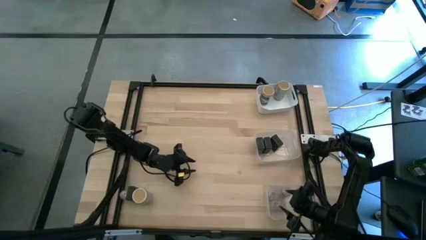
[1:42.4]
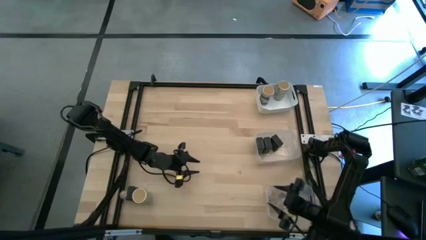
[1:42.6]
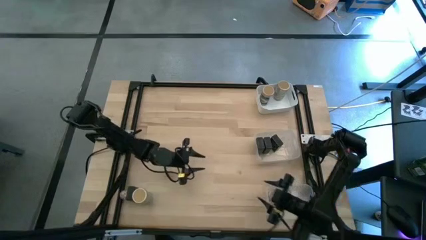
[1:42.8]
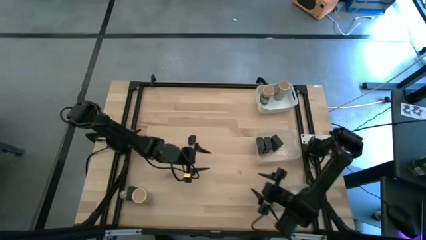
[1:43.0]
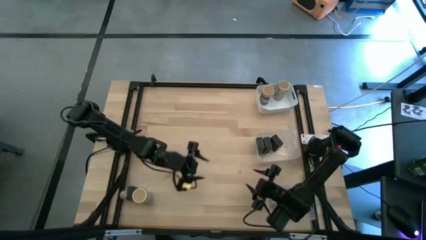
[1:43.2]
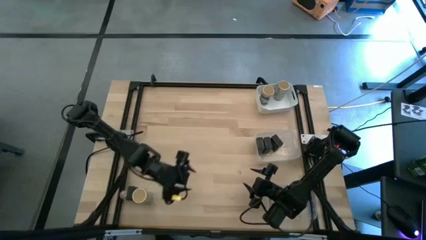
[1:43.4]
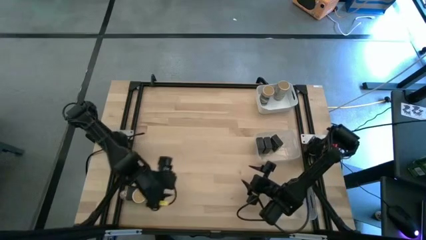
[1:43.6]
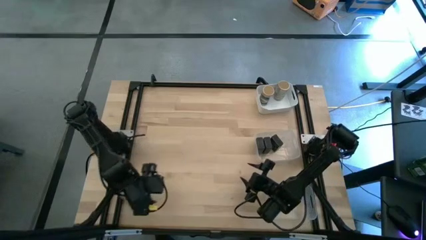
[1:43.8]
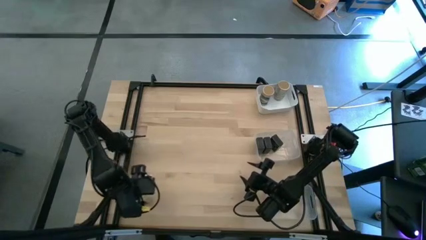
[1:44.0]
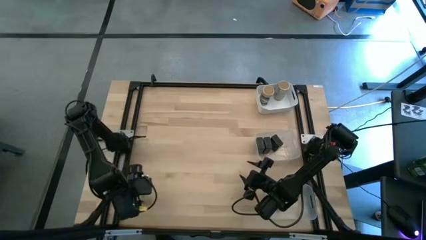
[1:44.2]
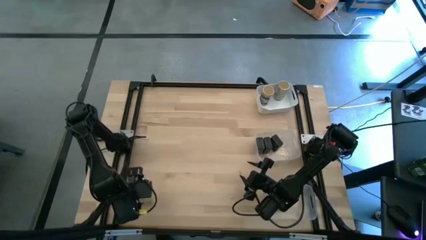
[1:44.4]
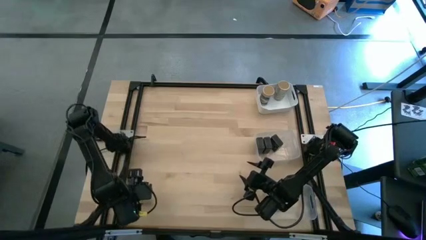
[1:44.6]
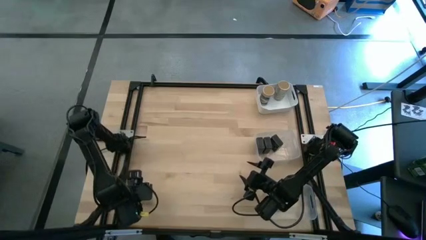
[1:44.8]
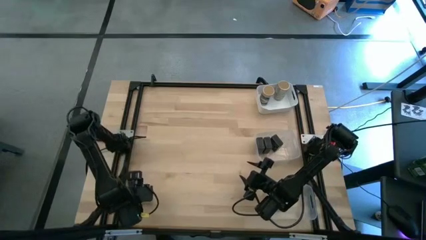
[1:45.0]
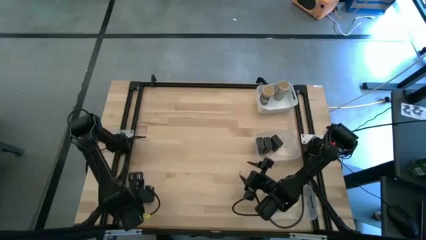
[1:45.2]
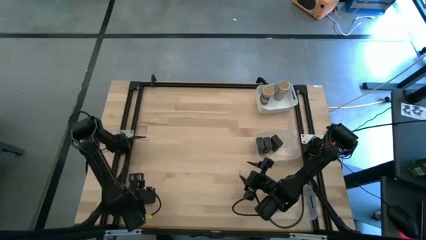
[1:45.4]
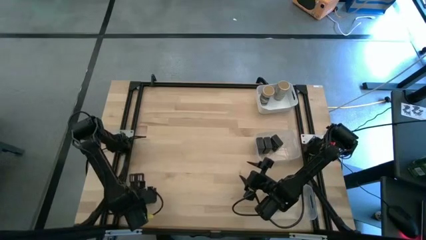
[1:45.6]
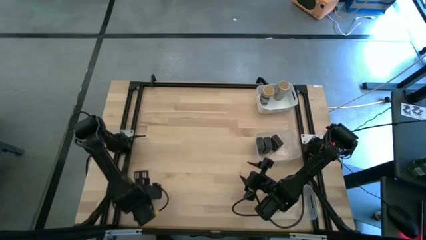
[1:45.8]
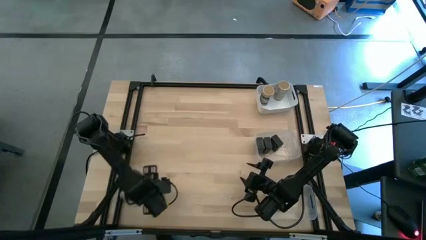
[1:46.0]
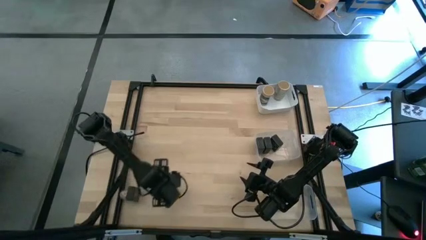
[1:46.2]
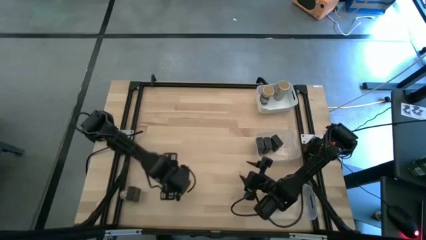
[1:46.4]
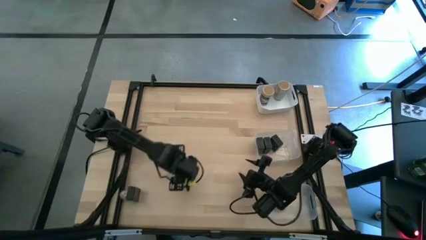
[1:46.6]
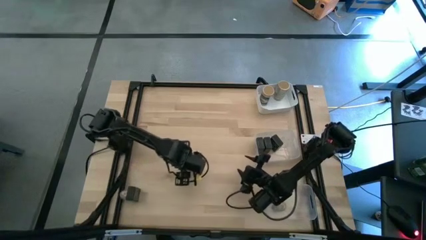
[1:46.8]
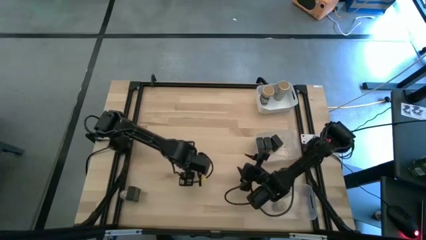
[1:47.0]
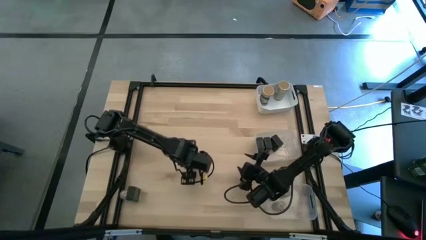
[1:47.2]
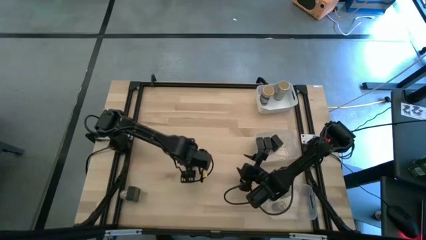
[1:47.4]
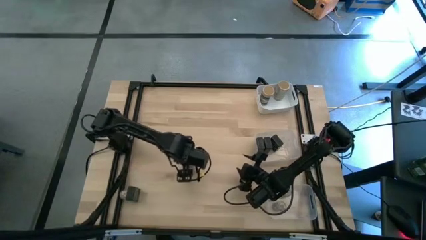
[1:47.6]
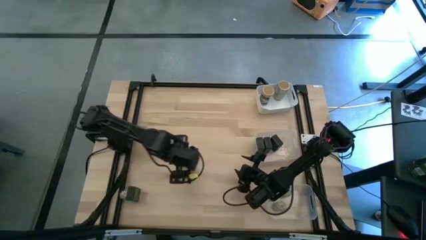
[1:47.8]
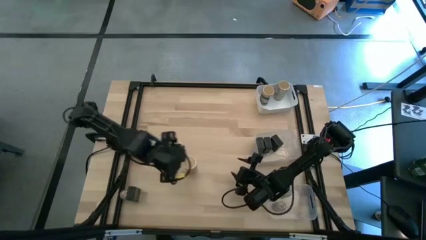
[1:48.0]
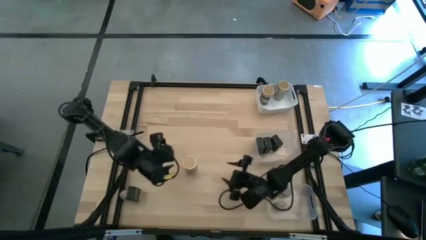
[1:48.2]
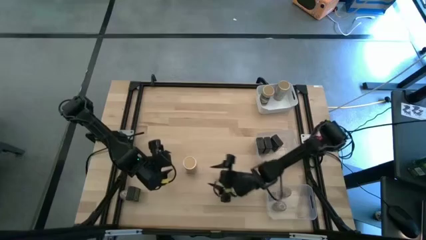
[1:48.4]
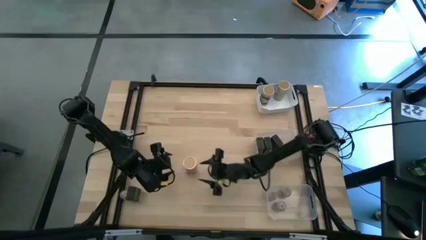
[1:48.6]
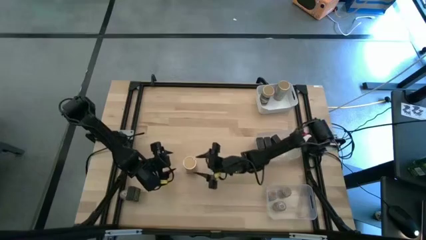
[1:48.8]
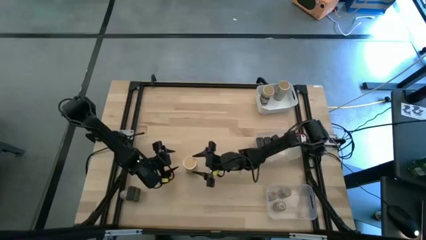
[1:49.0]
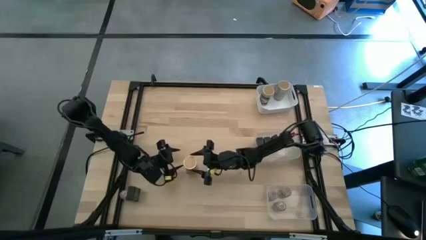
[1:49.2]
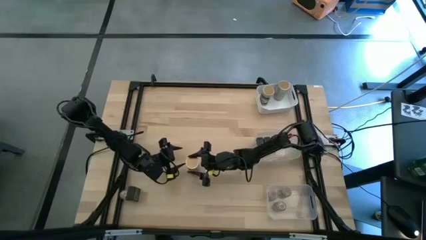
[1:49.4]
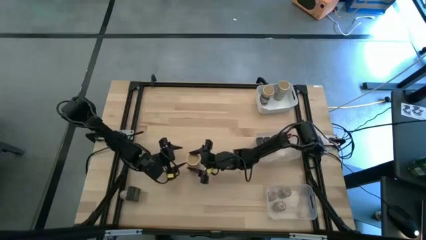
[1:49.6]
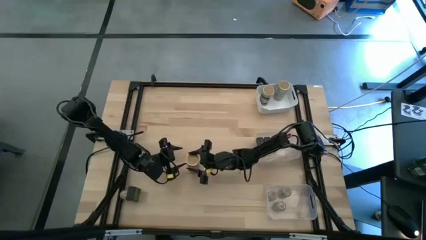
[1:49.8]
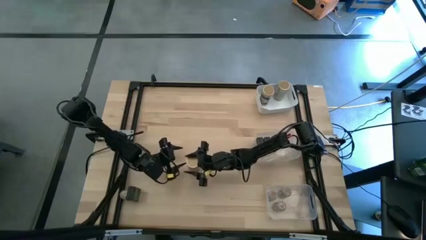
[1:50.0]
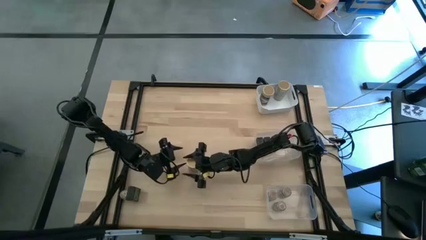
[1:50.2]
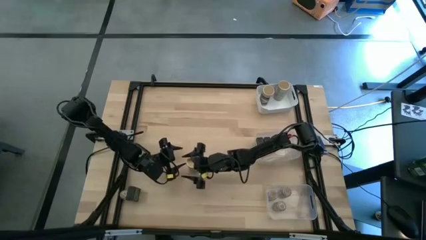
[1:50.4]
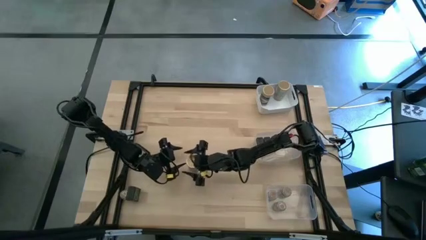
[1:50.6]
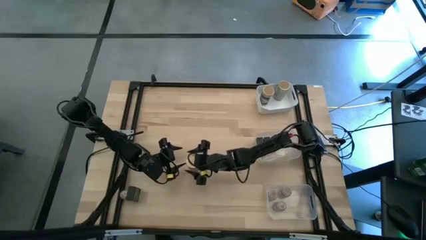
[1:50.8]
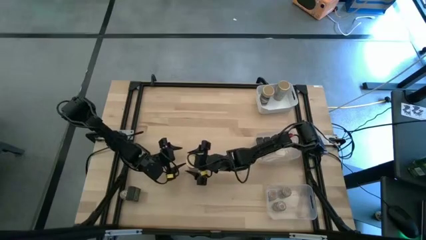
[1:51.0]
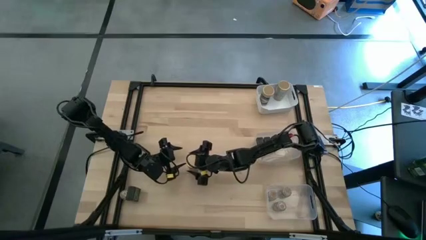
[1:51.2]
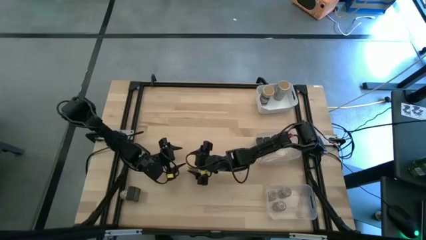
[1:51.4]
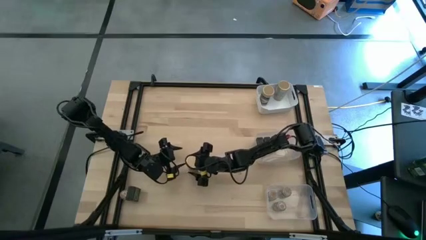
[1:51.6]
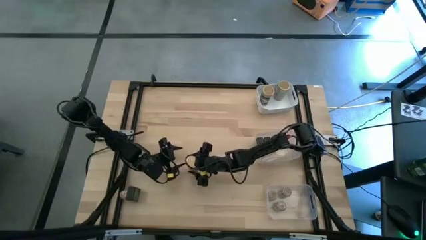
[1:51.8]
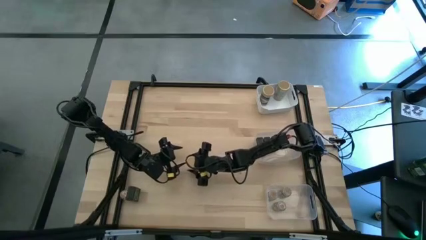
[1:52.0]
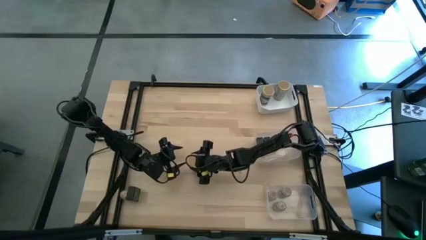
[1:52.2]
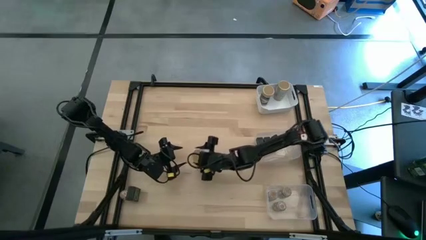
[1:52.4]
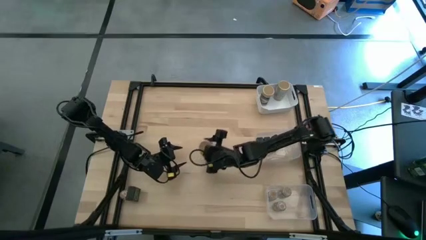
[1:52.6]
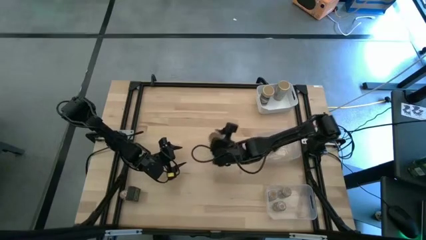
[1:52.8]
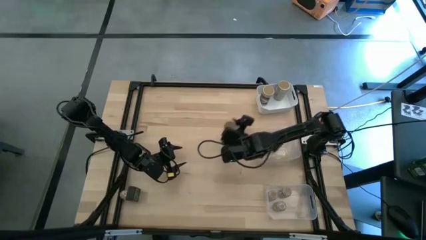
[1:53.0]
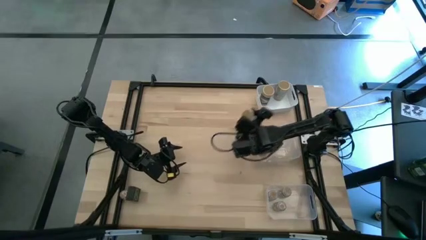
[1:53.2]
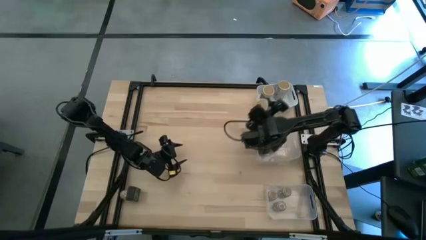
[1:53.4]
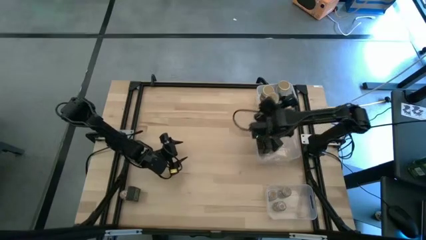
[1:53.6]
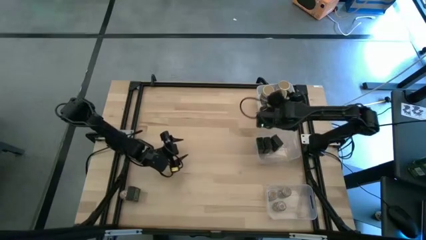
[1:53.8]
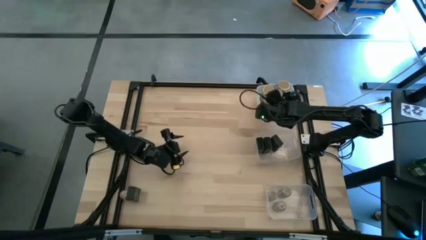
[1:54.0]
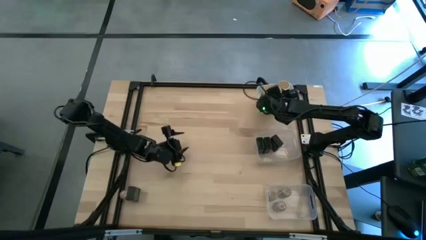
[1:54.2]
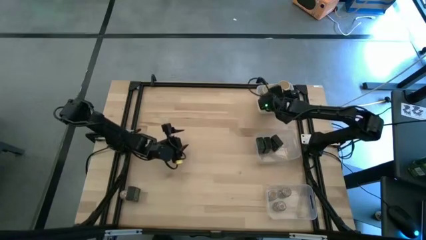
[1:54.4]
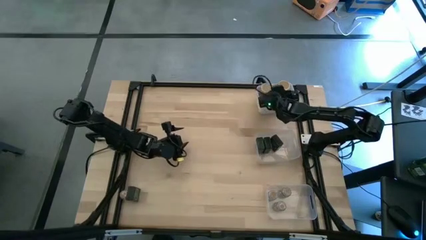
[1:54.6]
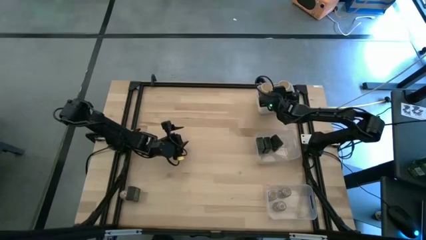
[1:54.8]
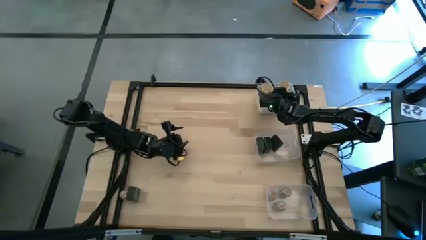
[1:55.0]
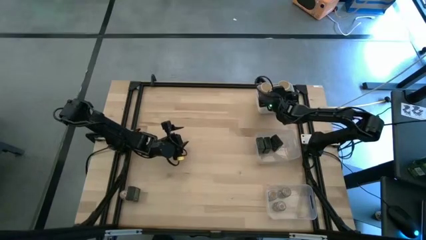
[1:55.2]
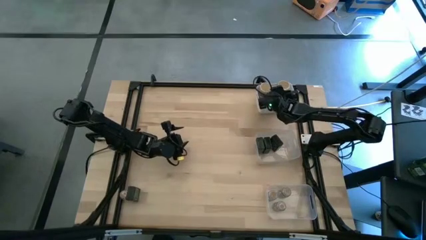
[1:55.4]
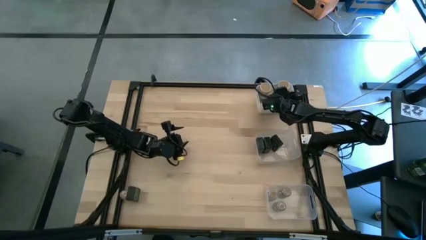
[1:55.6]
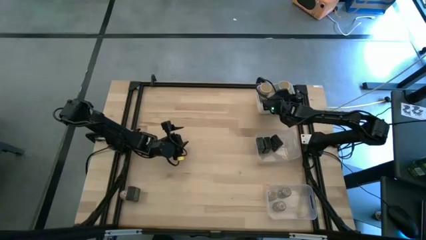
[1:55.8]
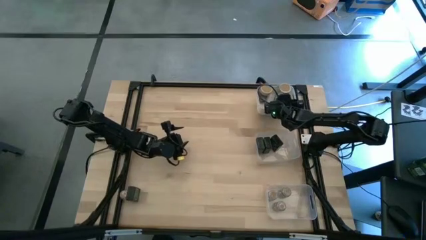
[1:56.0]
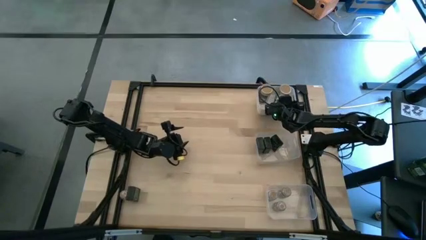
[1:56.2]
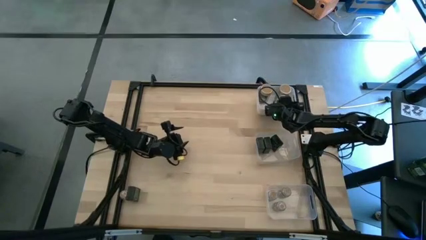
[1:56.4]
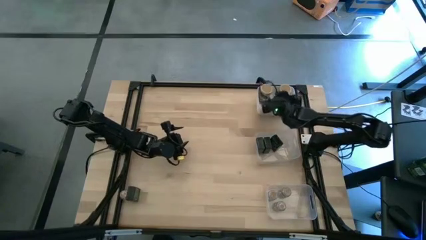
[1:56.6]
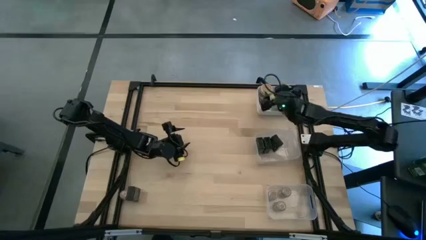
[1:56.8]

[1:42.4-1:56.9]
Task: Sort spices by type
Put the brown seasoning bottle into the white bin

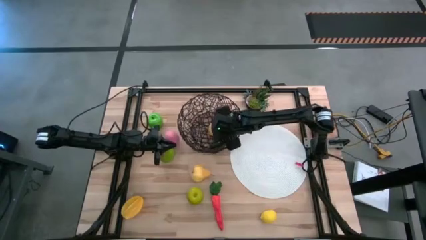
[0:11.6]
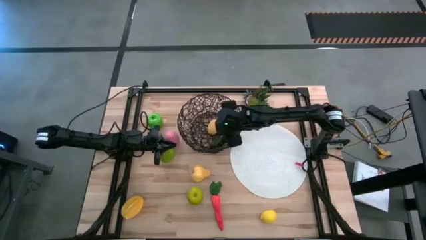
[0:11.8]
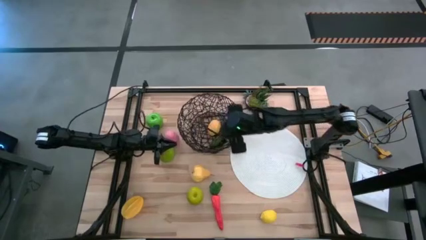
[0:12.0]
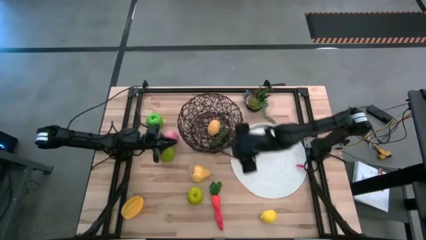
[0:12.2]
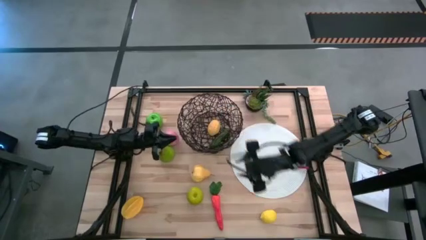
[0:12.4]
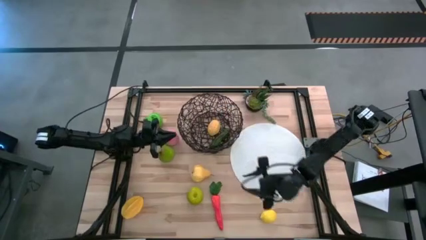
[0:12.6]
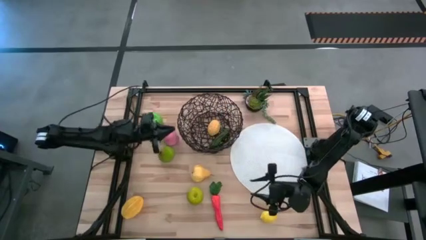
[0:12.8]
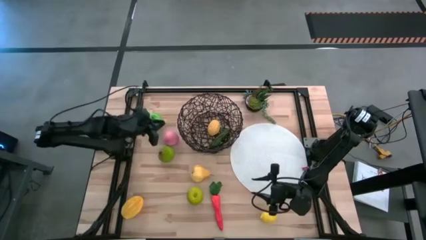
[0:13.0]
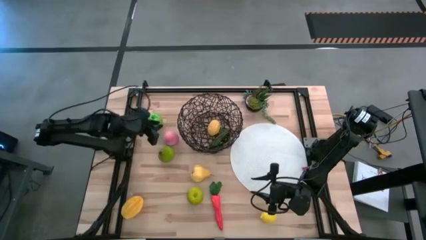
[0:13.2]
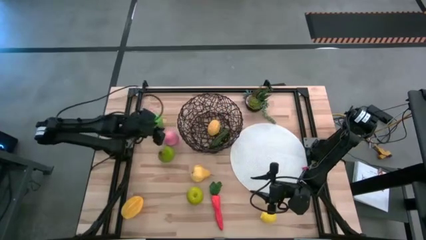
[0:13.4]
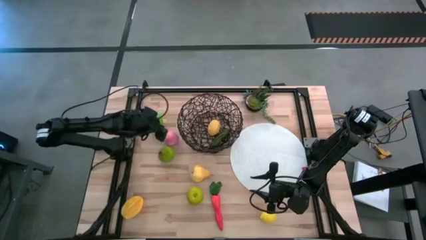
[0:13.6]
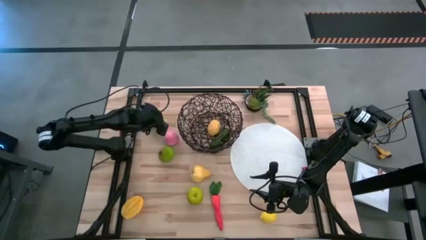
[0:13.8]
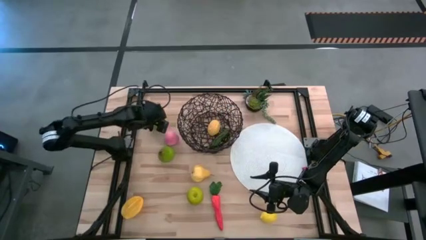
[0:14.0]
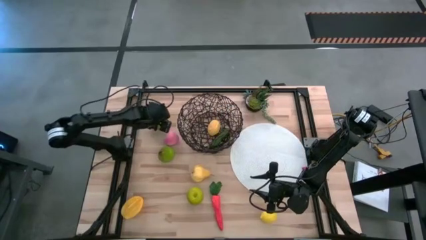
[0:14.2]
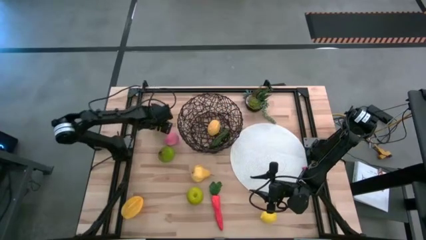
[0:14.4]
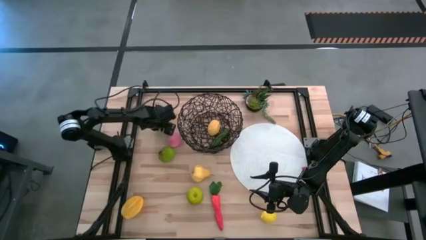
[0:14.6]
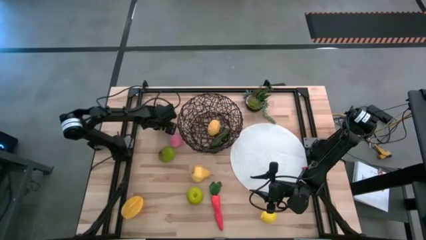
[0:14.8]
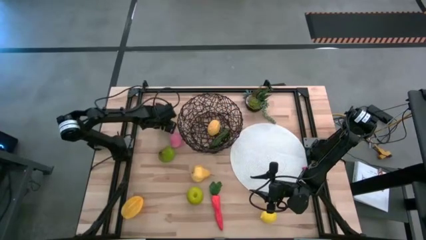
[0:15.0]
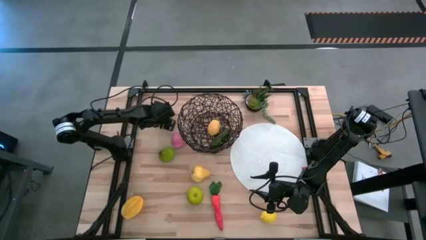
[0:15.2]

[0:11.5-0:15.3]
Task: Build produce basket
Put the top green apple into the wire basket
